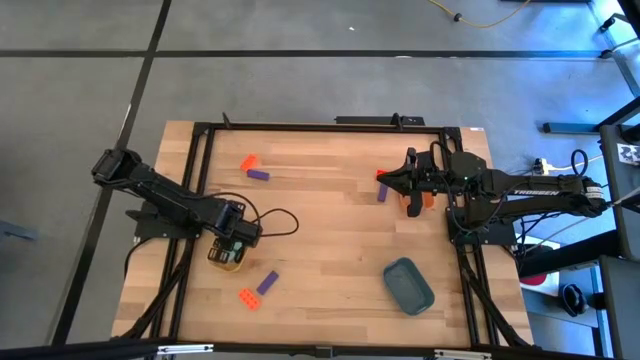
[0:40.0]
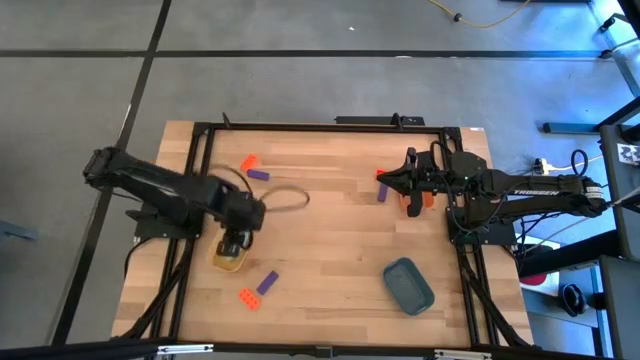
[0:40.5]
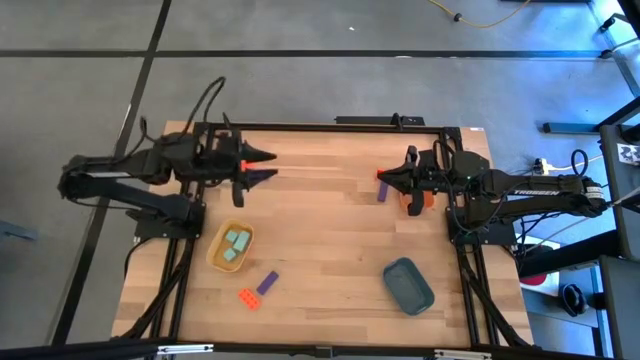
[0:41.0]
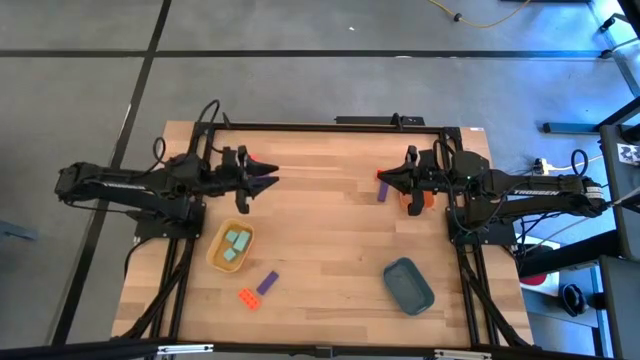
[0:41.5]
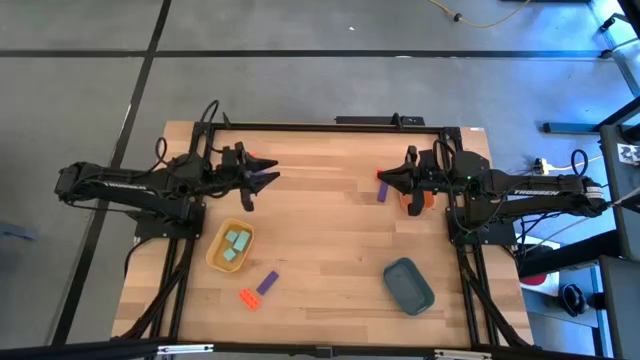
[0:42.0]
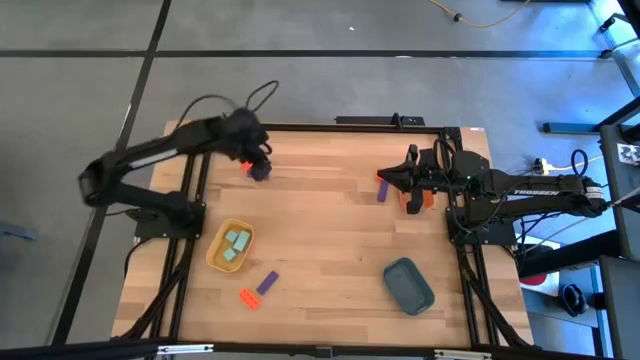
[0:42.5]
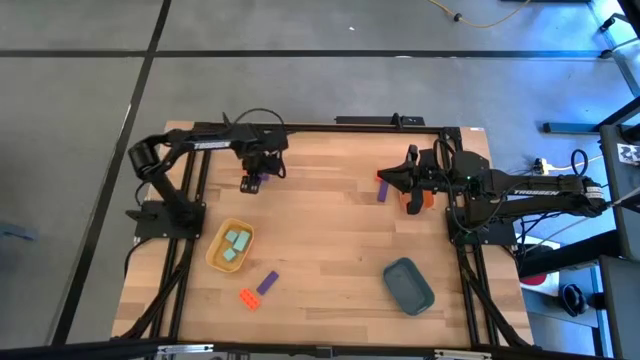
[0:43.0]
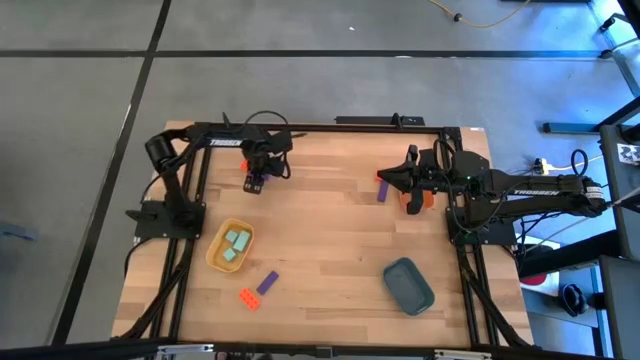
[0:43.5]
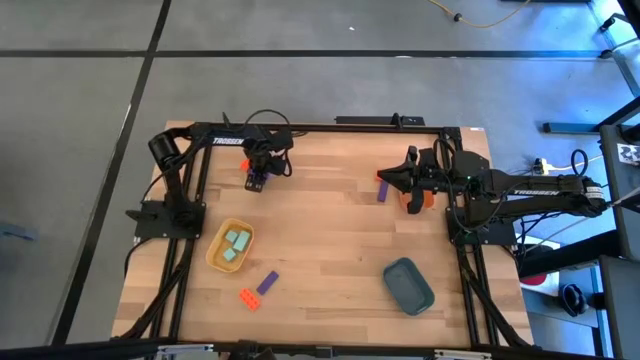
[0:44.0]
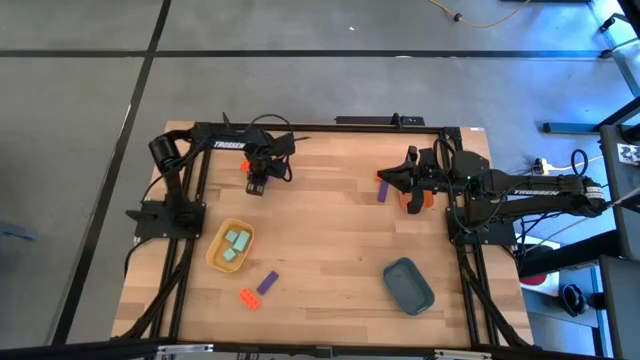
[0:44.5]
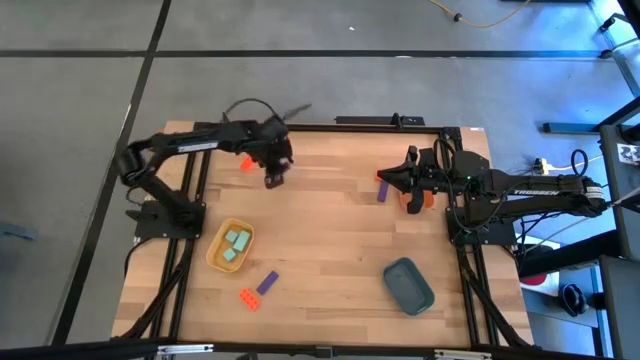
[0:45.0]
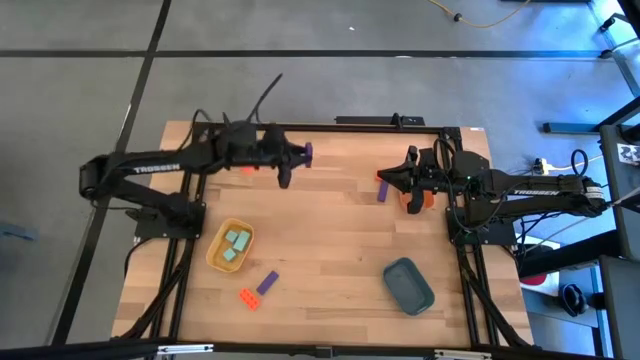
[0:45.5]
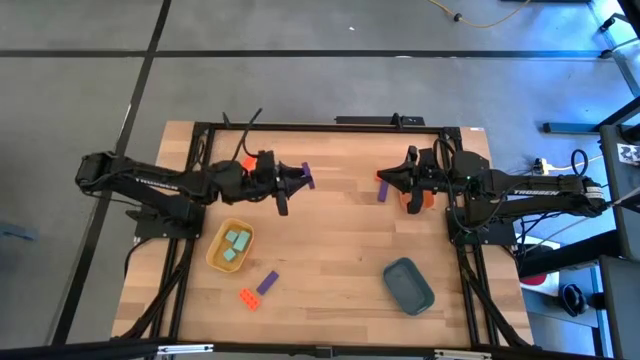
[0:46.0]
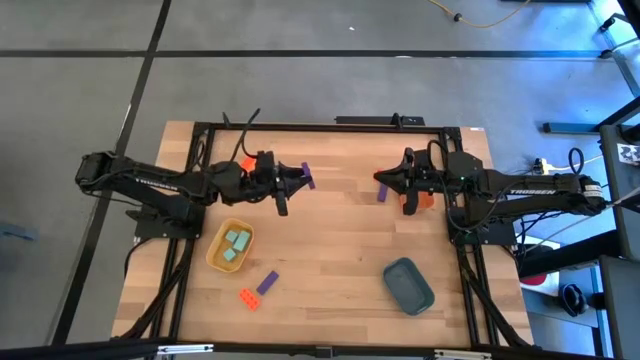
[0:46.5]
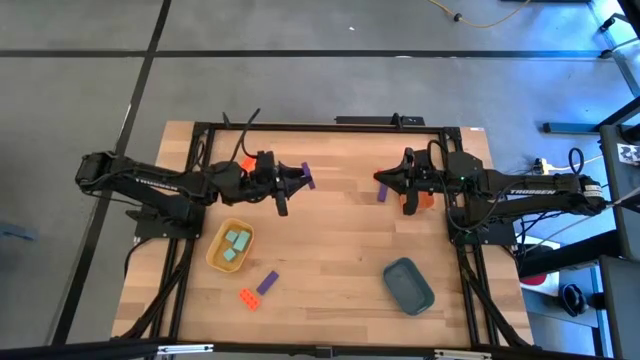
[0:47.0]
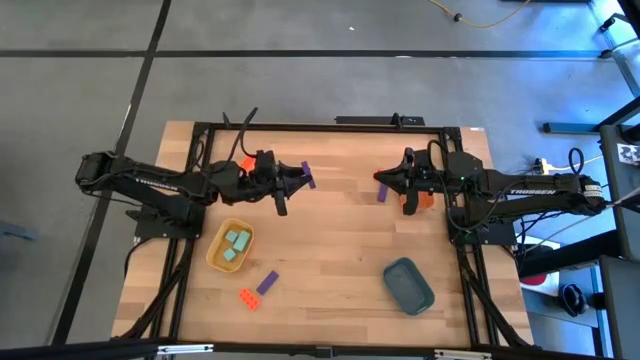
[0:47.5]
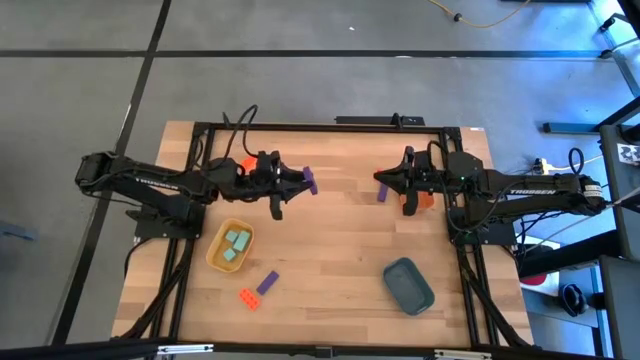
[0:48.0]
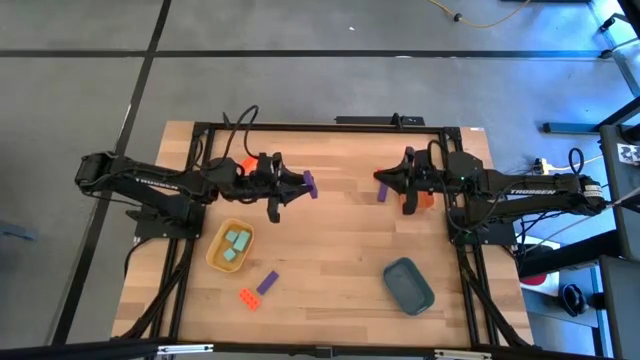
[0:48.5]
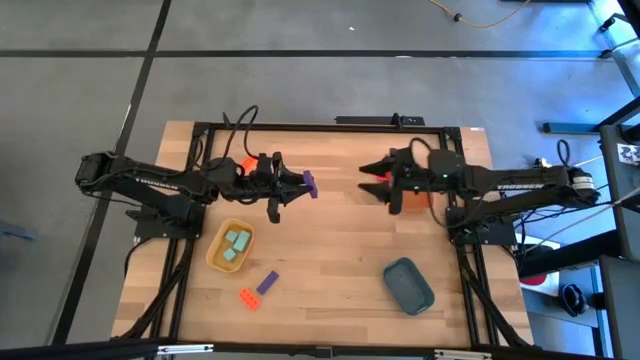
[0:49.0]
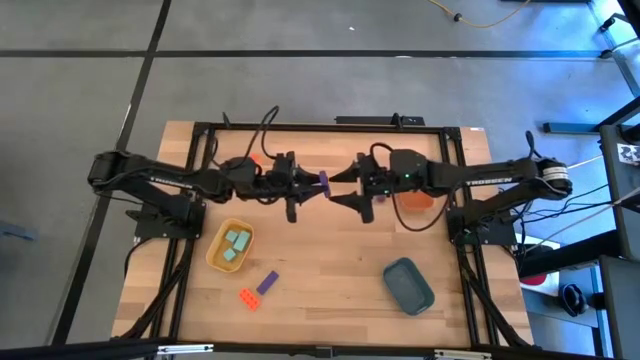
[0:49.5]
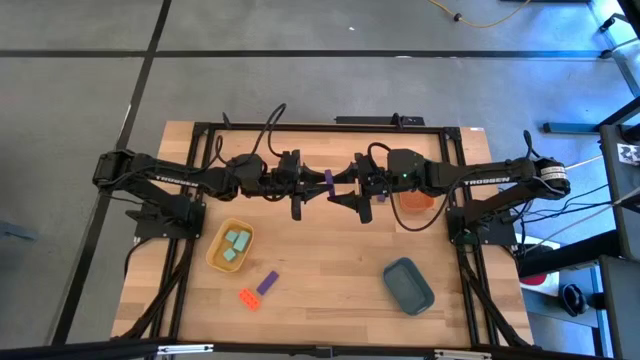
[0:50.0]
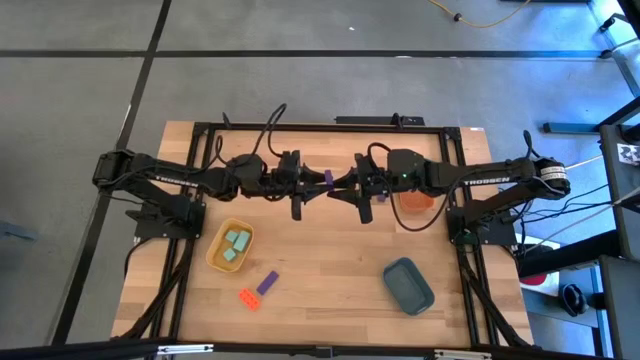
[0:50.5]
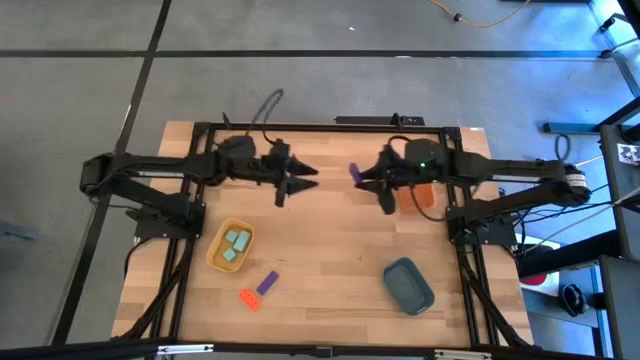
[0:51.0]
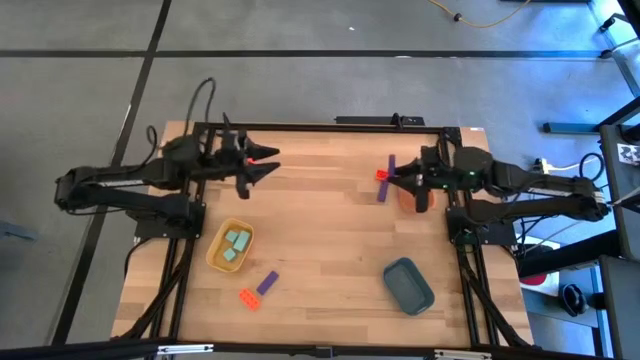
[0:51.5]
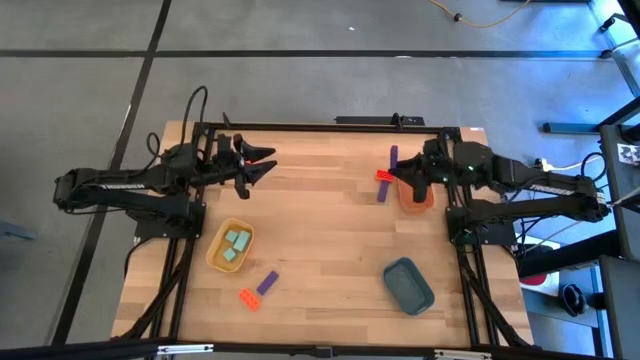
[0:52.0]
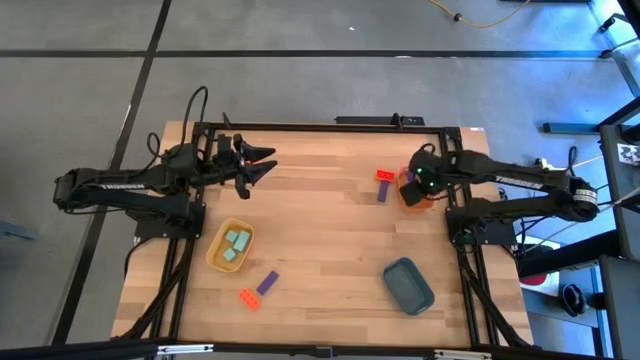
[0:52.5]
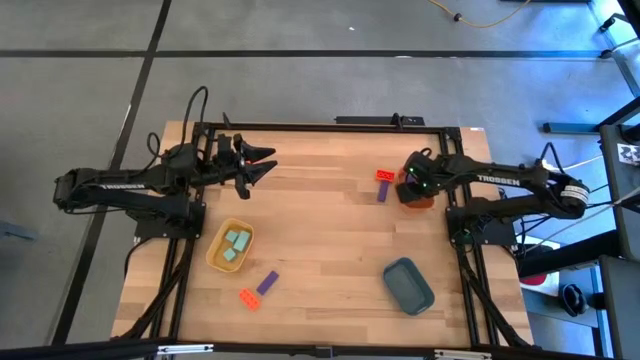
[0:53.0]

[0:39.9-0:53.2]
Task: Sort & place blocks by color
Put the top left purple block into the orange bin

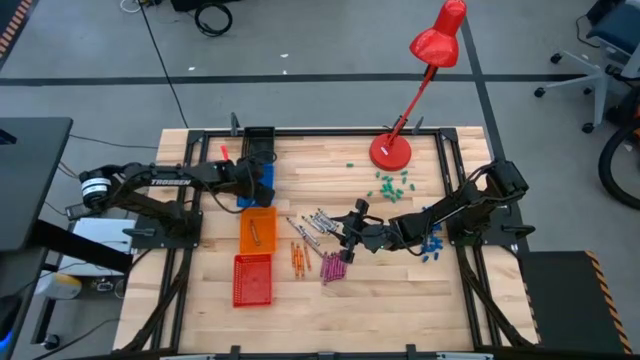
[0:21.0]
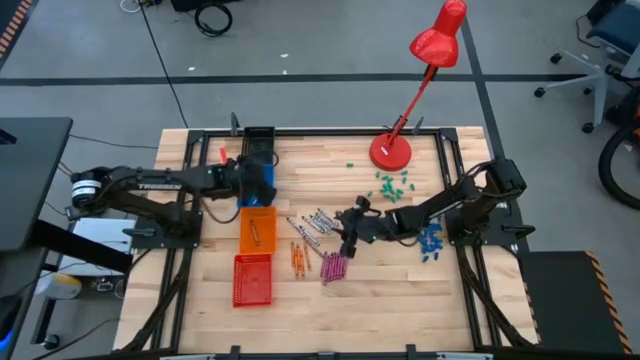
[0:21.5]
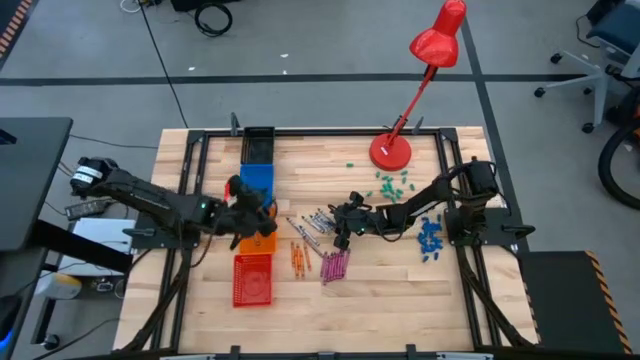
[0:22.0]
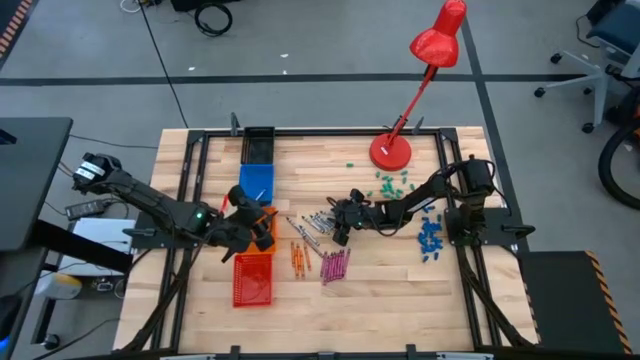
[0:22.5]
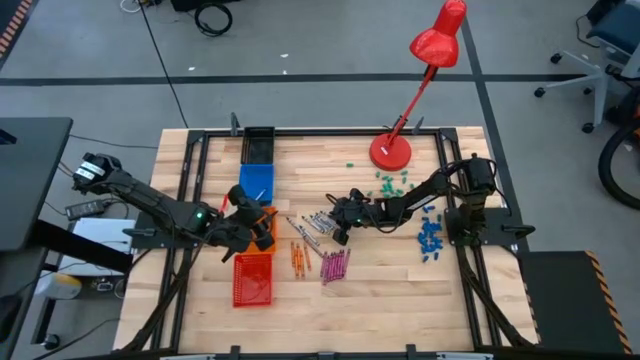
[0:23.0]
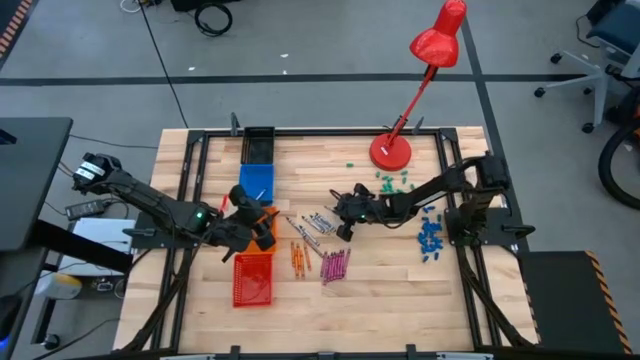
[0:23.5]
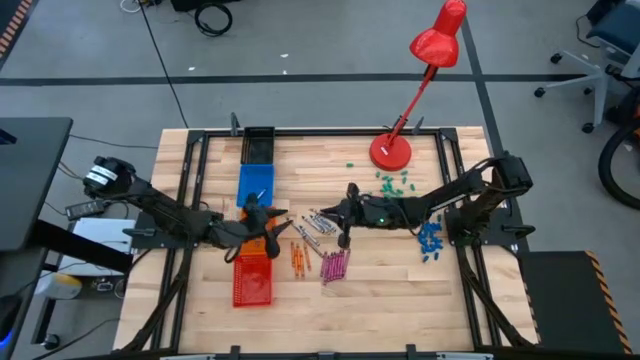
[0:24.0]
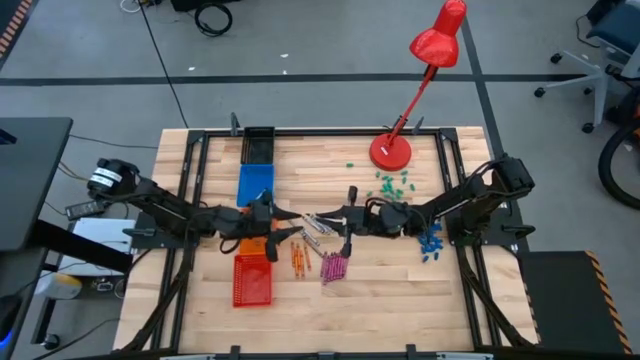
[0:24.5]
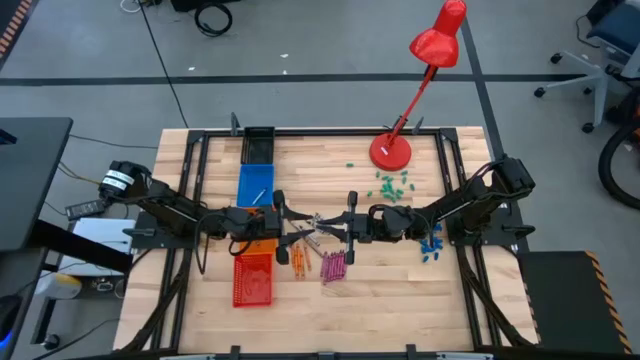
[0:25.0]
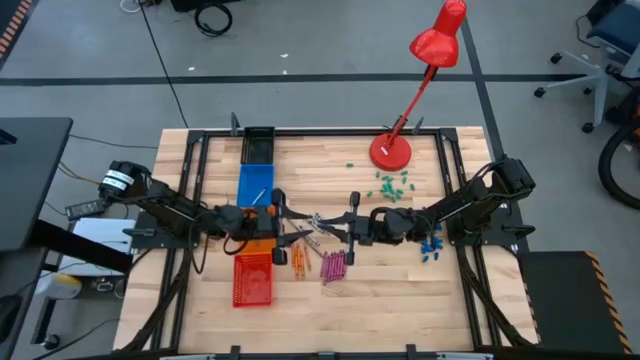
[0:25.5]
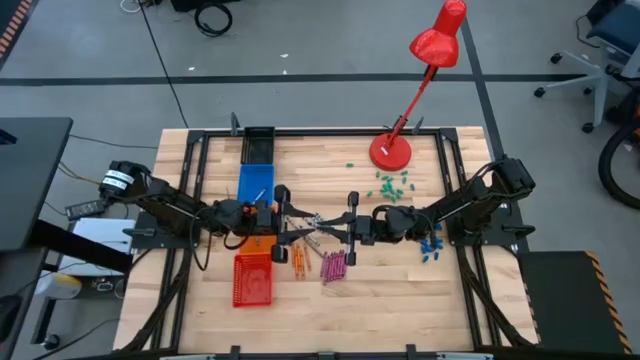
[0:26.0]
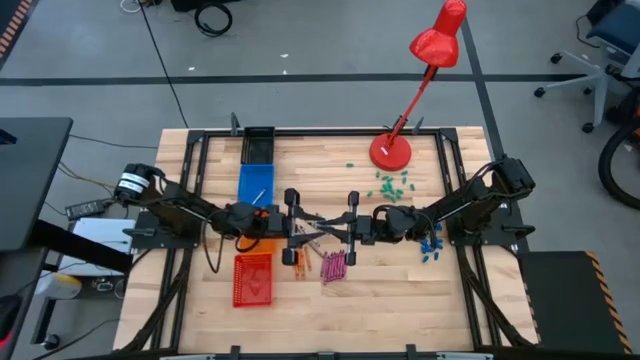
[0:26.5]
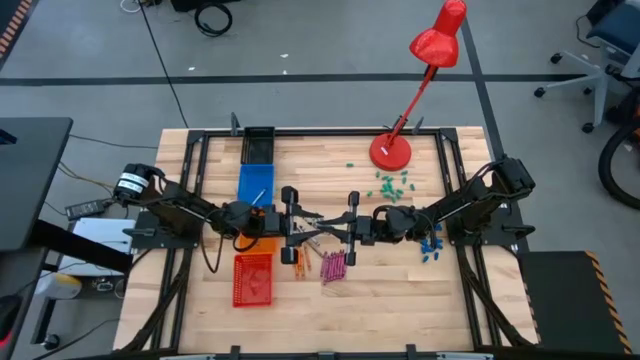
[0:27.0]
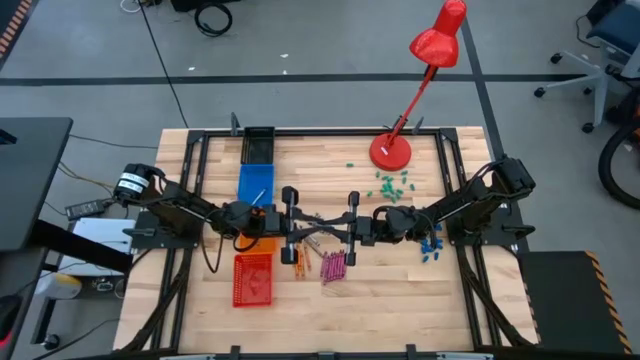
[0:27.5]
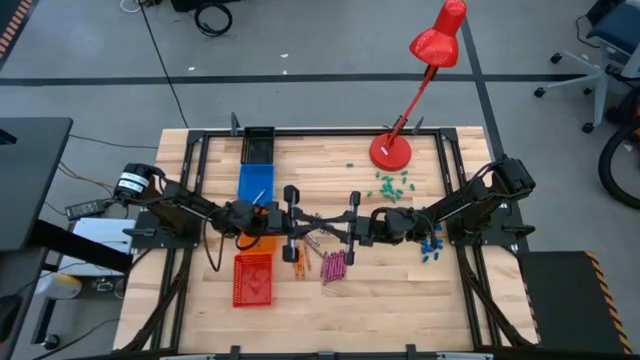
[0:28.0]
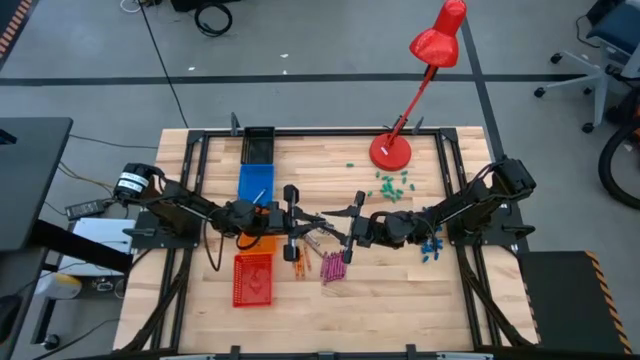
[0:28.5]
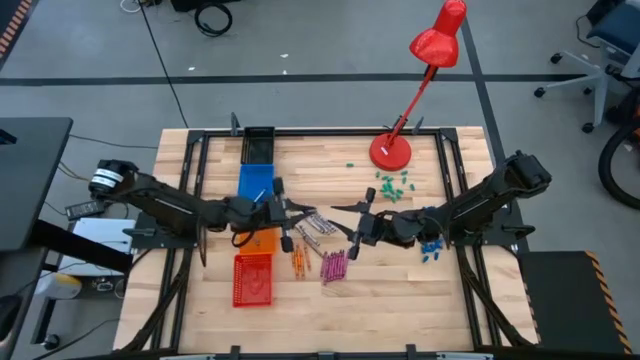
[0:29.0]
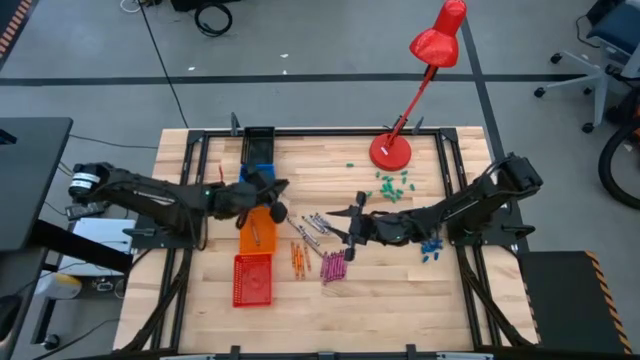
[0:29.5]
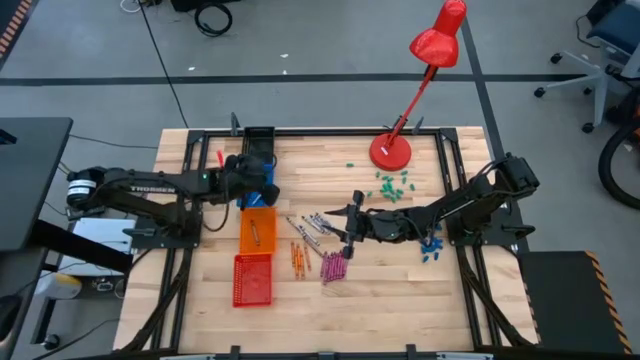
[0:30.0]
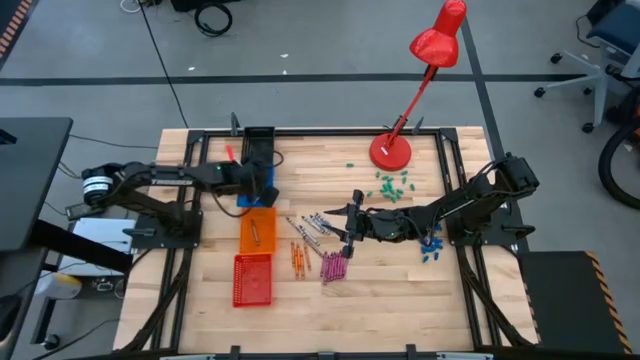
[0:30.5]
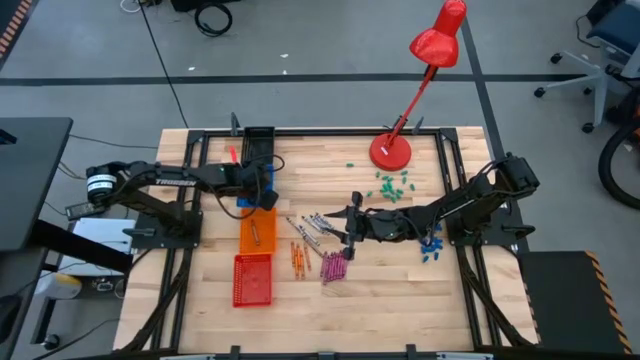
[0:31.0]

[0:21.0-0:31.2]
Task: Sort crayons
Put the black crayon into the blue bin
